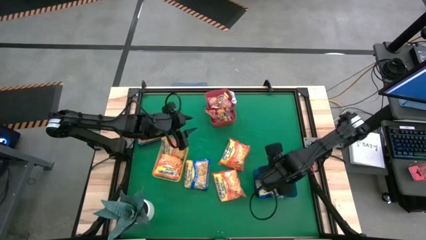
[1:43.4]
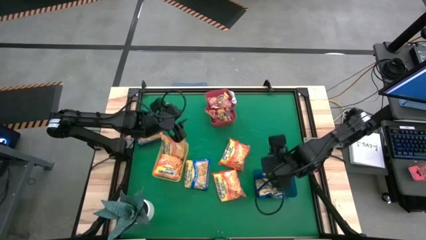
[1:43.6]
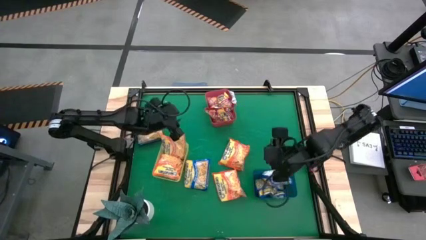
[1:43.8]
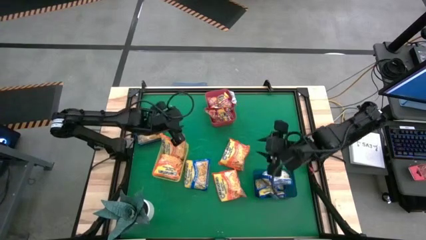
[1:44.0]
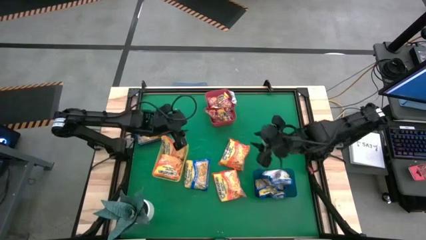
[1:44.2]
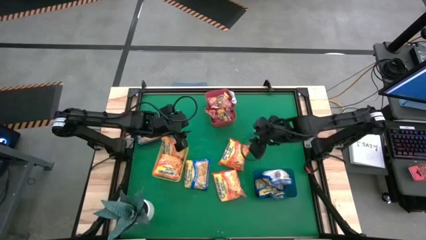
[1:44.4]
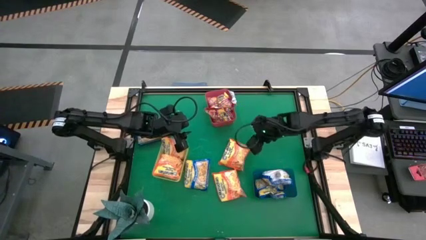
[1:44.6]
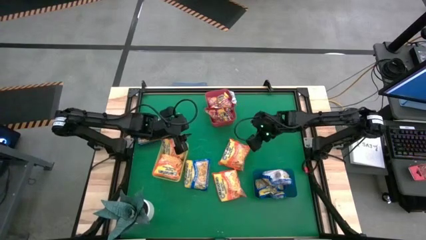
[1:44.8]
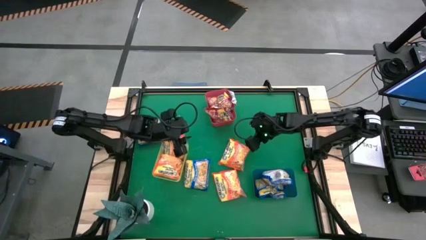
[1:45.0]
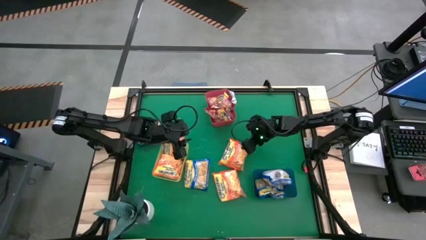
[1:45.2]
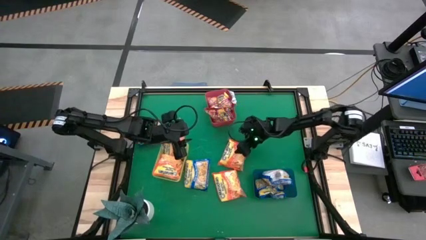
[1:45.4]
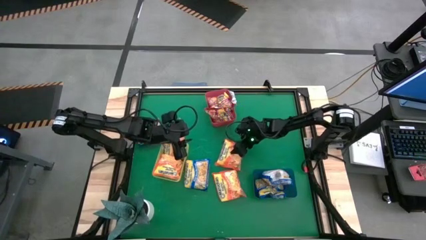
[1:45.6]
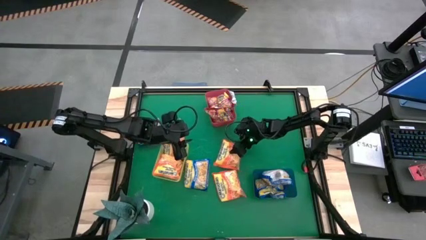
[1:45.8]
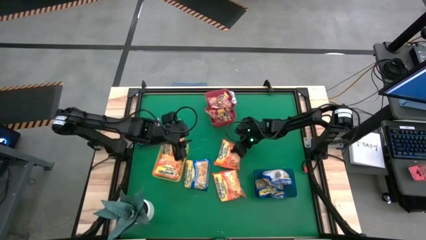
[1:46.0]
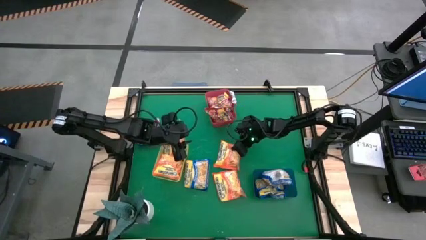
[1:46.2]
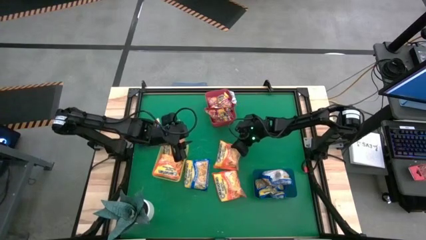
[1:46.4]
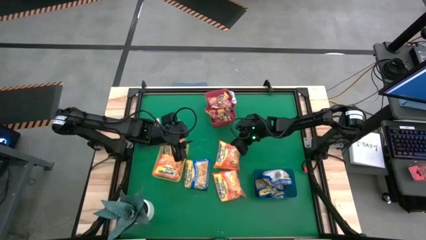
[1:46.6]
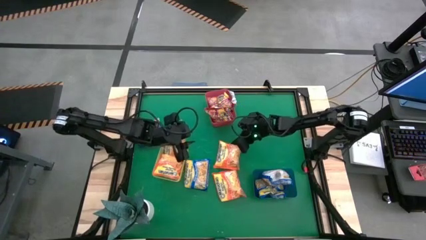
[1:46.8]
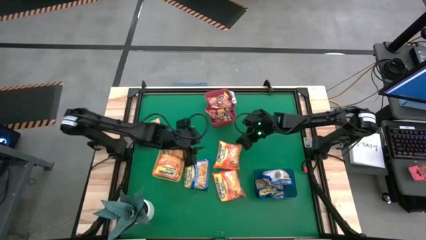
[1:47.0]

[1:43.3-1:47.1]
Task: Sort Maruchan noodles
Put the orange noodle pack into the yellow bin

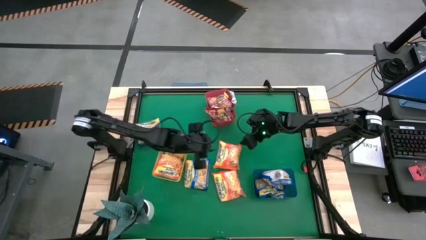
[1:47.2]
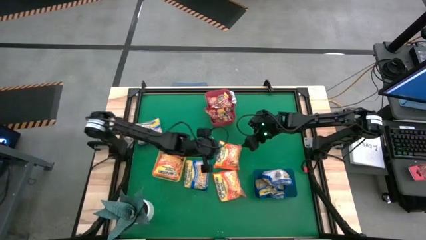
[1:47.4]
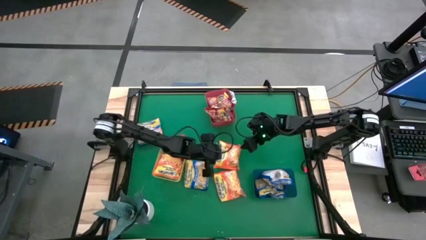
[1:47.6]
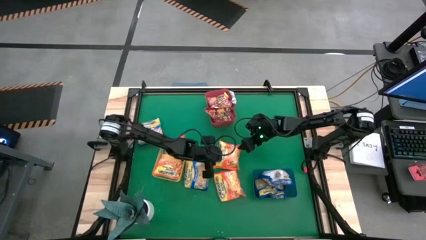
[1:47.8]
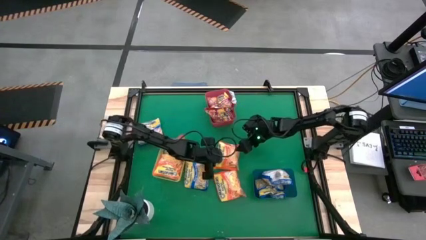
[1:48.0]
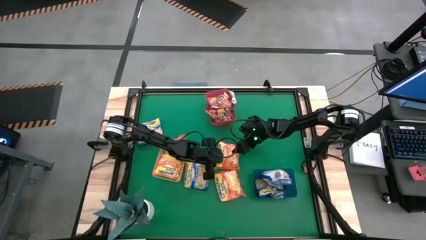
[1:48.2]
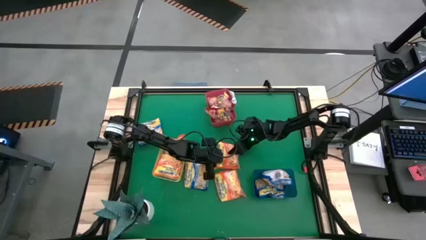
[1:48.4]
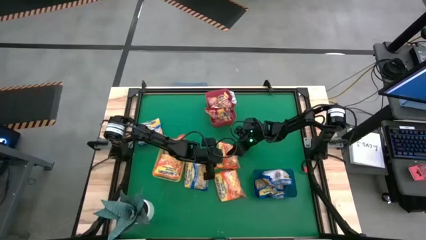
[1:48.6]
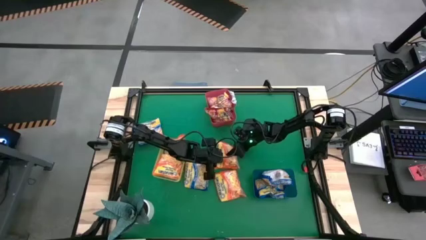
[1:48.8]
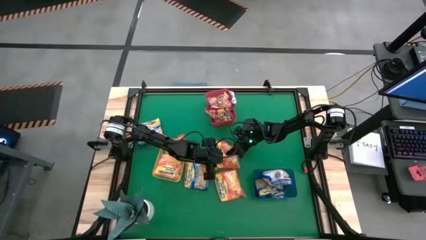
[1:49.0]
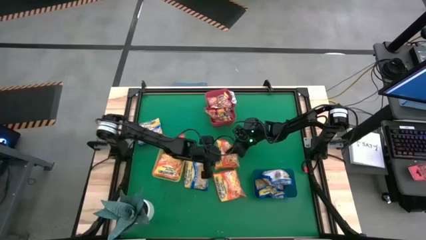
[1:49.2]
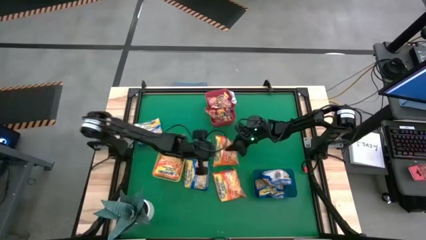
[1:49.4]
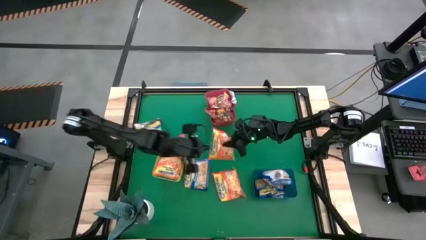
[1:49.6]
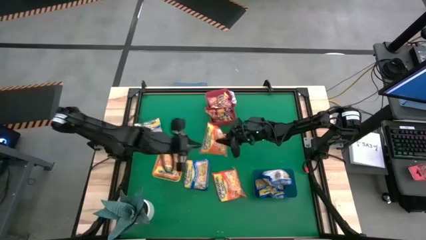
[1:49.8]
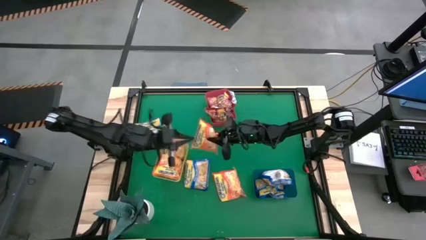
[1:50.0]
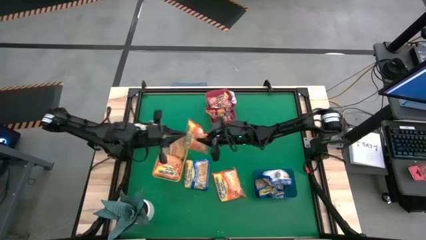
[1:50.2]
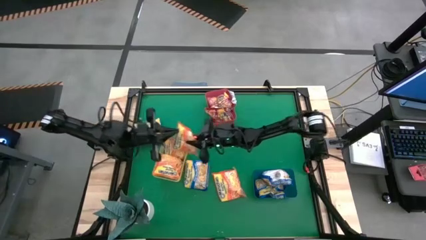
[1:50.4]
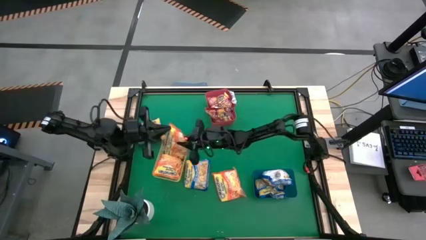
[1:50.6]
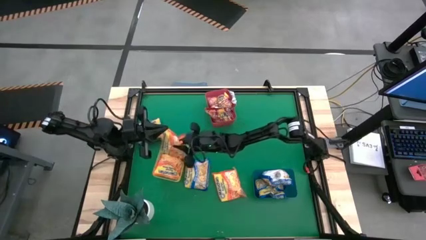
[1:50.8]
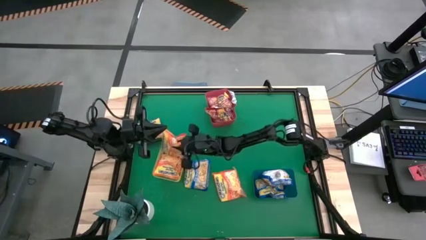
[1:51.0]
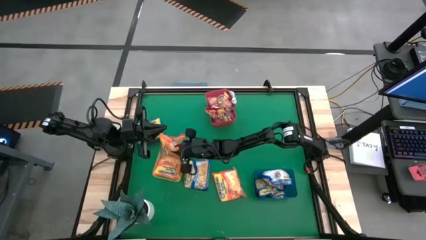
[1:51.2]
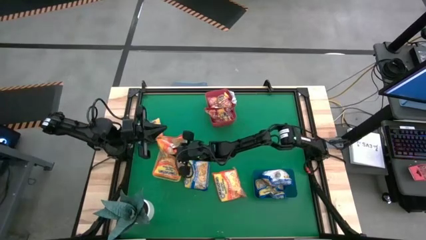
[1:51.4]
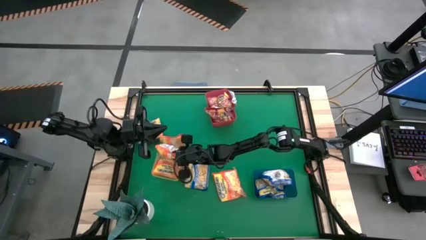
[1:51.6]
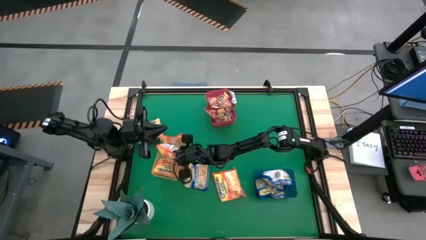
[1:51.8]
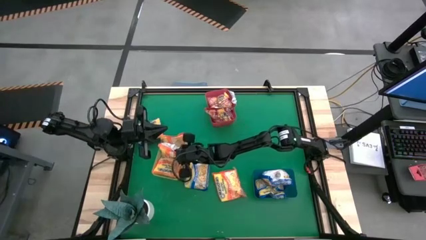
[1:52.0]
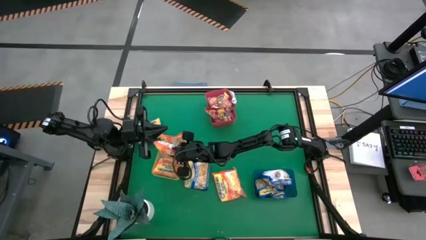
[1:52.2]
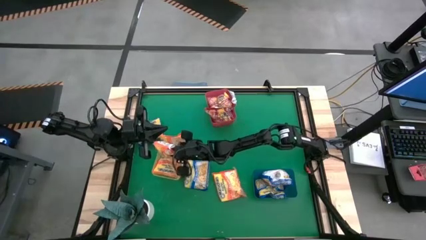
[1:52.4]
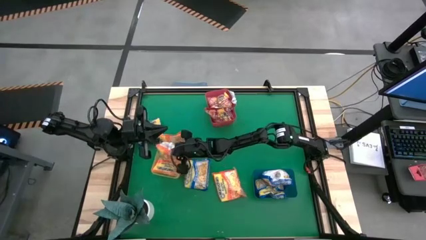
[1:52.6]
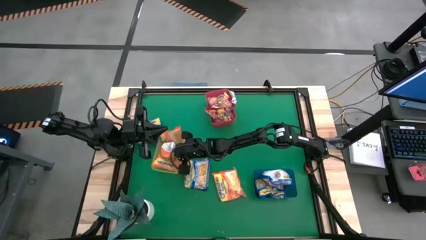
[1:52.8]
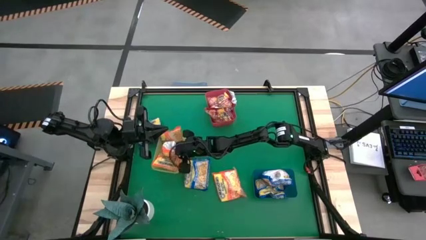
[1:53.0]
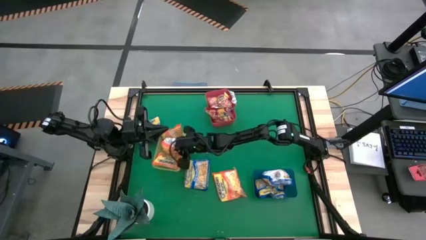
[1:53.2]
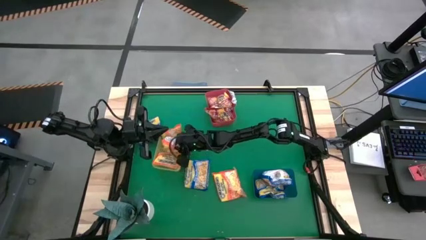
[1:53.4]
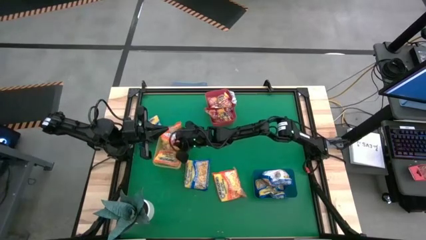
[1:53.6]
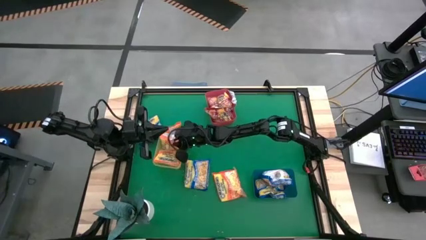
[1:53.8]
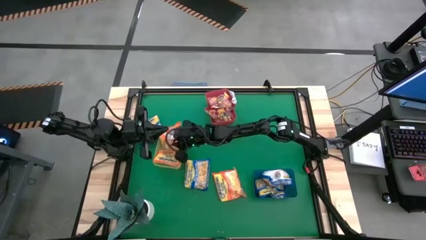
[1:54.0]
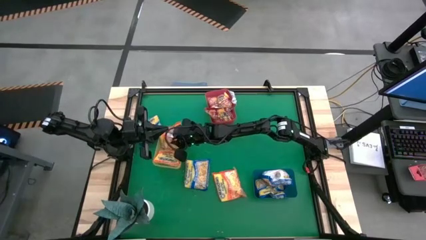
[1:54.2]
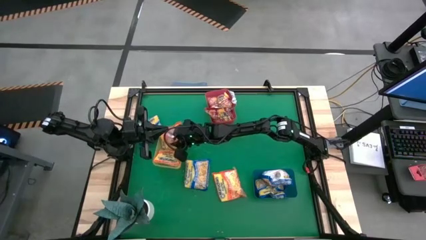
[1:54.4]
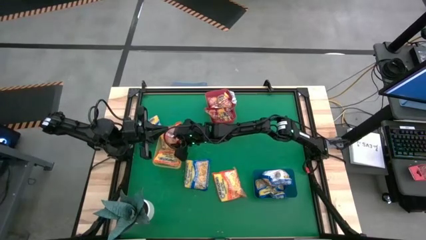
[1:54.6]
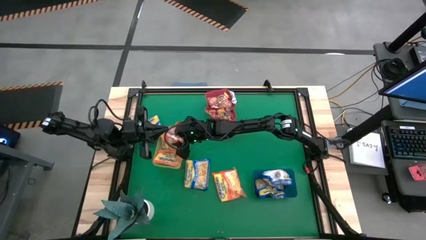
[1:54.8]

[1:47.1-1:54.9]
Put the orange noodle pack into the yellow bin

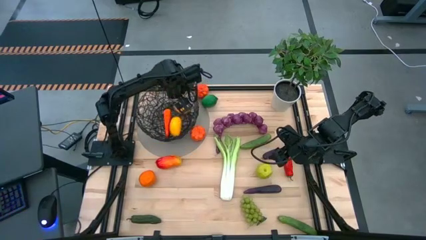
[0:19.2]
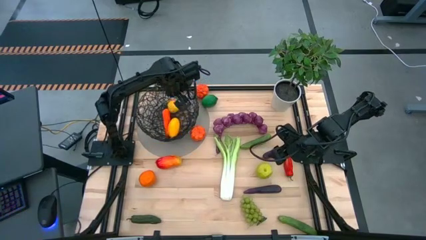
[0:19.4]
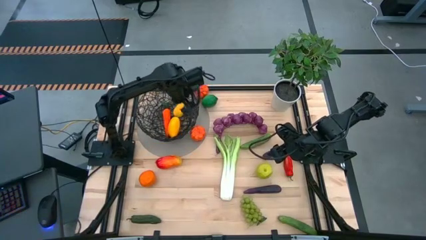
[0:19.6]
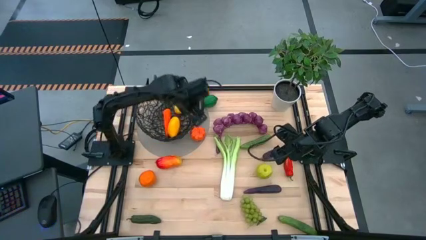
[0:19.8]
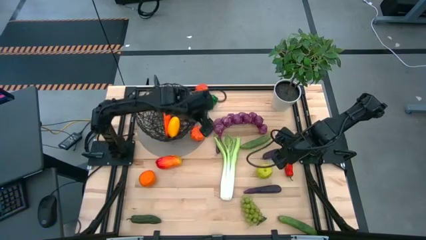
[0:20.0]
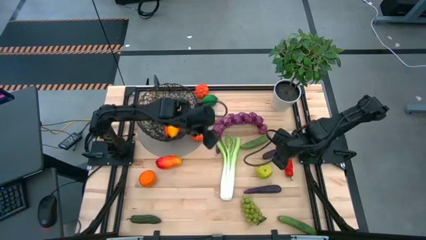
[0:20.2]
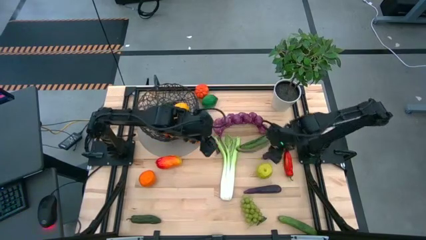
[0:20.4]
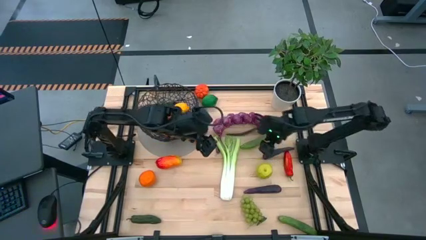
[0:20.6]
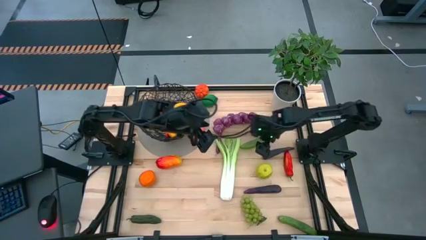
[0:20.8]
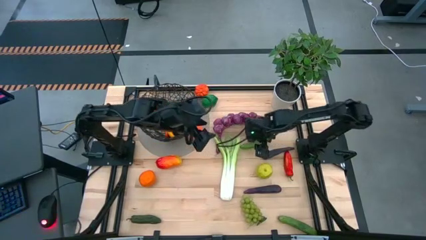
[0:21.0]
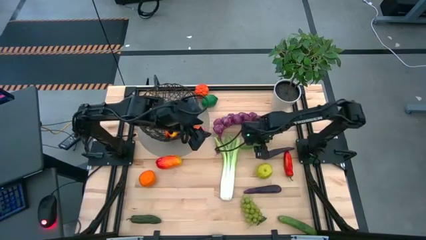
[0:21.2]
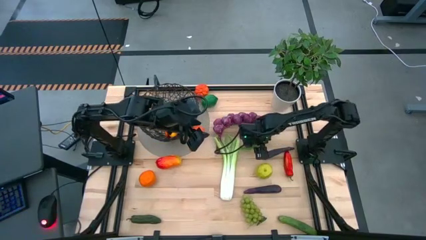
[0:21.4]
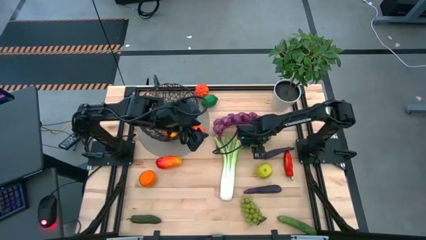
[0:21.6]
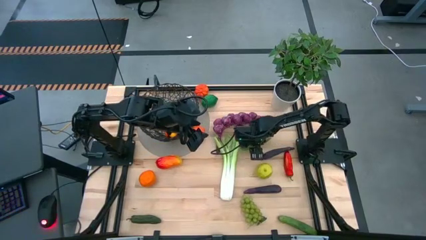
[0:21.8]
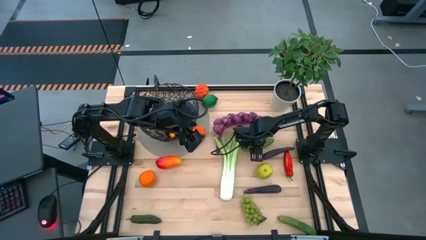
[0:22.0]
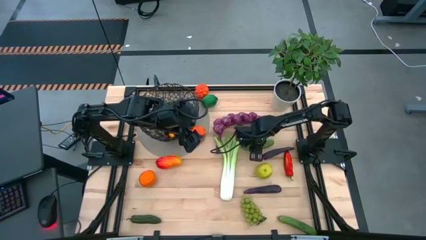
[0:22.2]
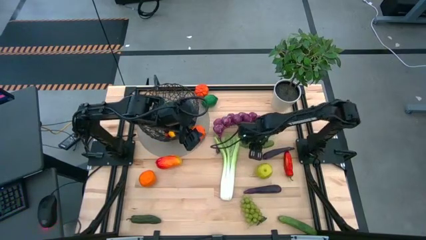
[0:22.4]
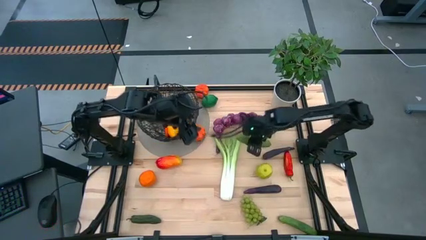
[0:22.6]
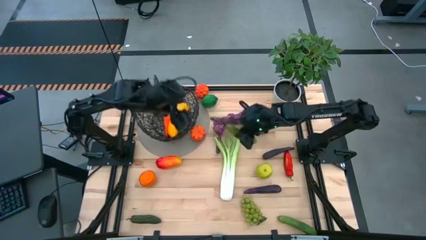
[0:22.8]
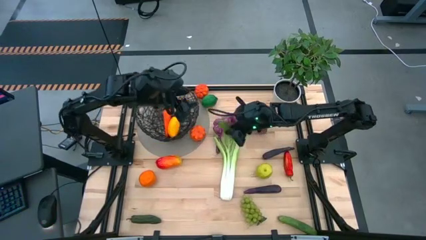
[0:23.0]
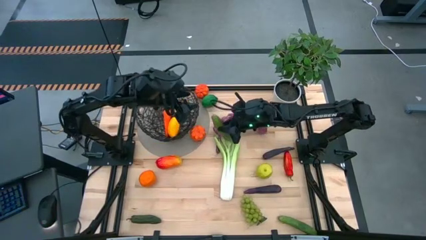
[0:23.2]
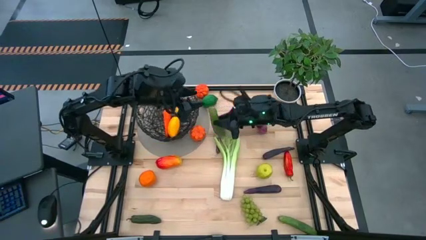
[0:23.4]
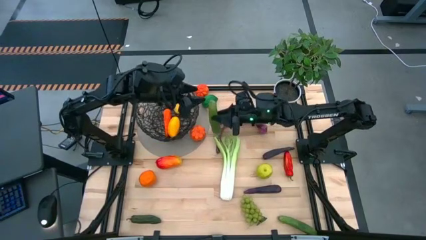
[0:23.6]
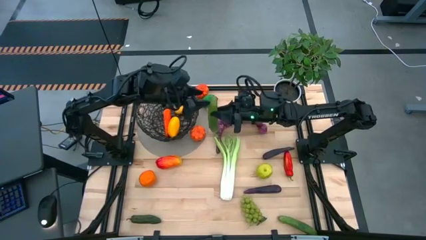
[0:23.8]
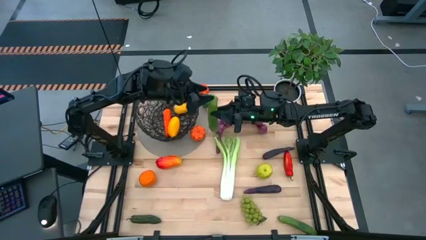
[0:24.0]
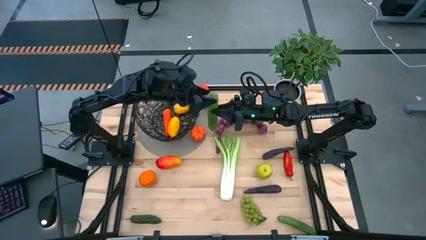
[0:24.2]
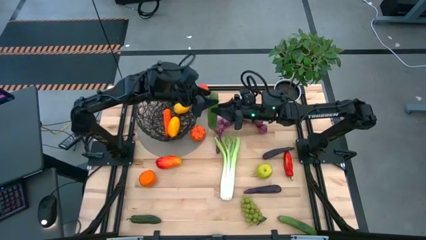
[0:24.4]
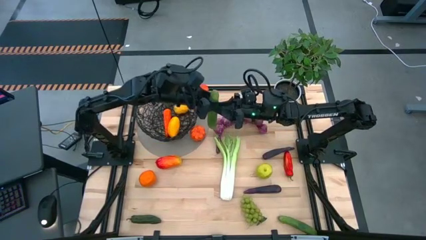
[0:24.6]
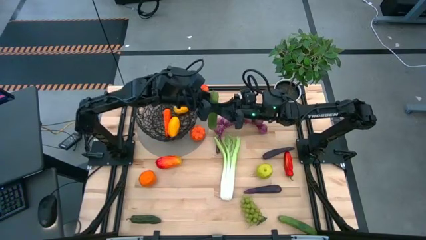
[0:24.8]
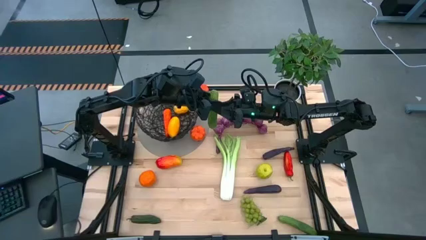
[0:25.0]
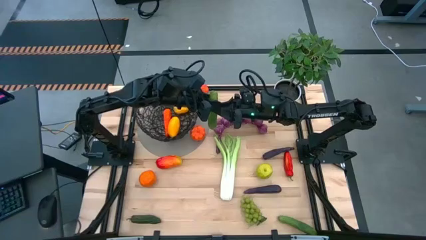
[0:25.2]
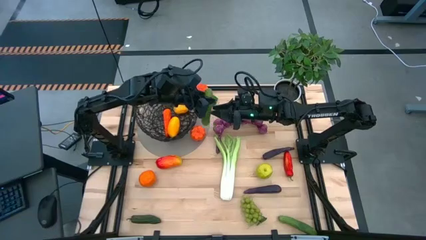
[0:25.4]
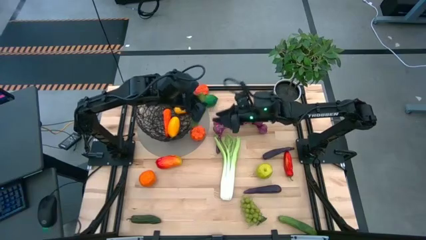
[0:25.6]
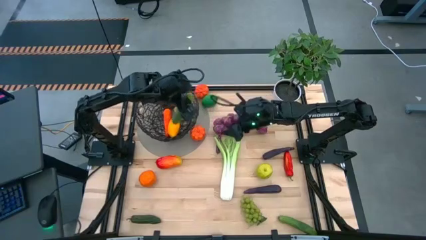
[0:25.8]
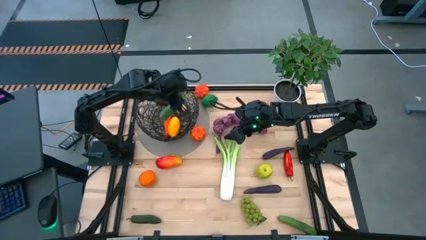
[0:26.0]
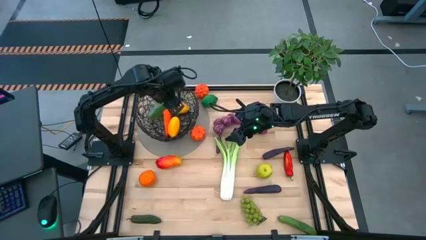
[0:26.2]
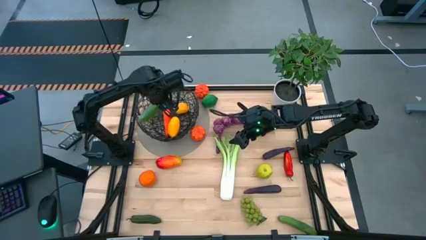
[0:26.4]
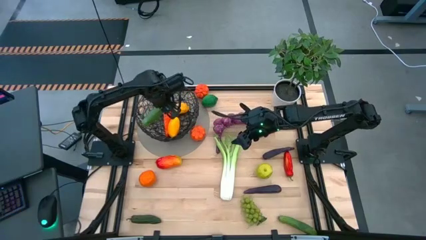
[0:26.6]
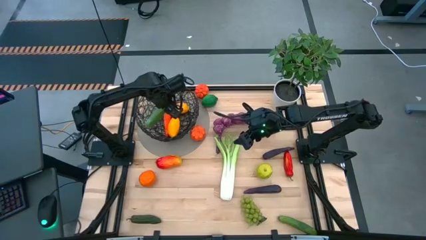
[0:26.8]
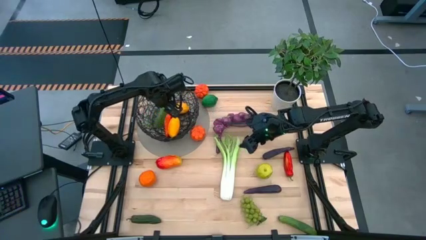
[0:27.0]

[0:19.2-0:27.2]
Task: Build produce basket
Put the green cucumber into the wire basket
